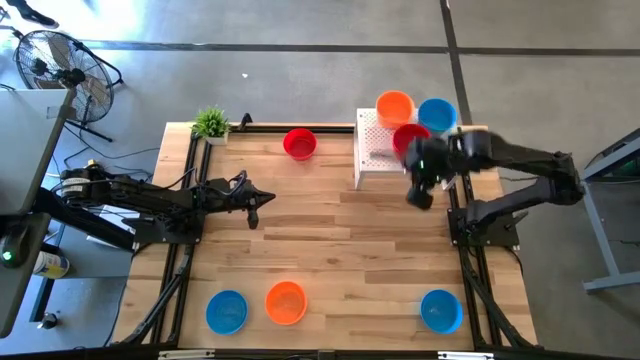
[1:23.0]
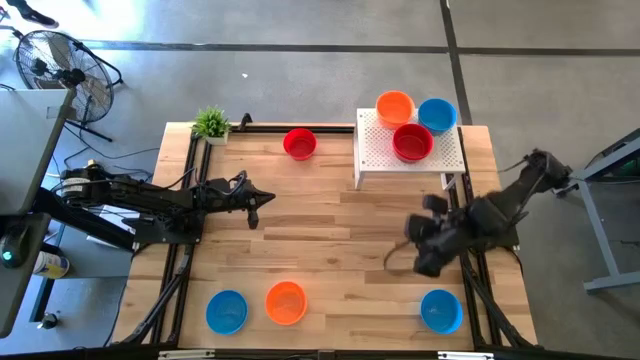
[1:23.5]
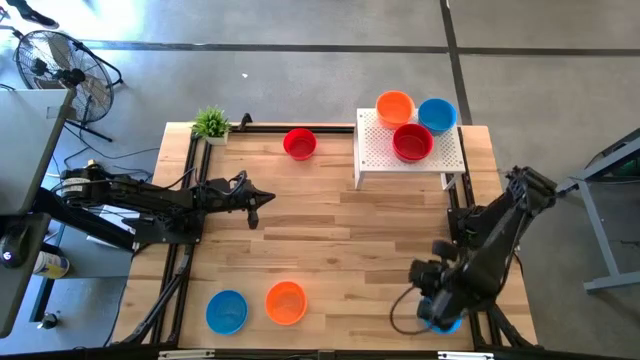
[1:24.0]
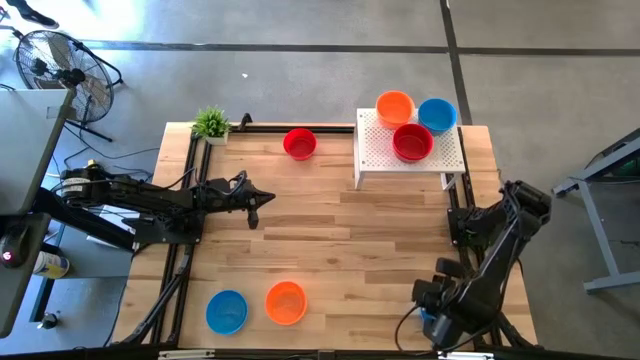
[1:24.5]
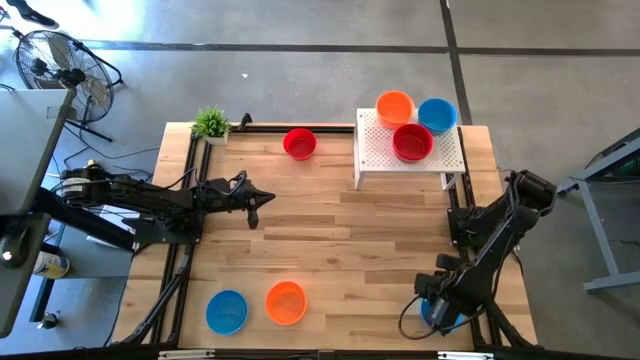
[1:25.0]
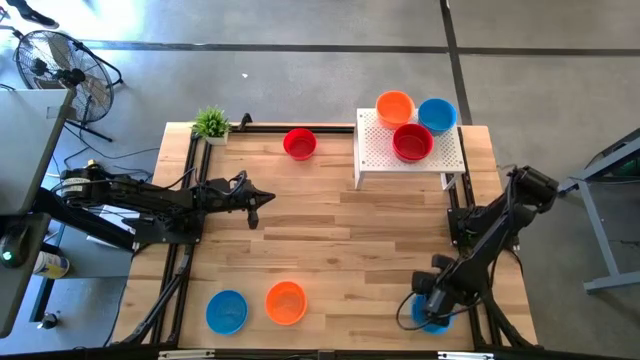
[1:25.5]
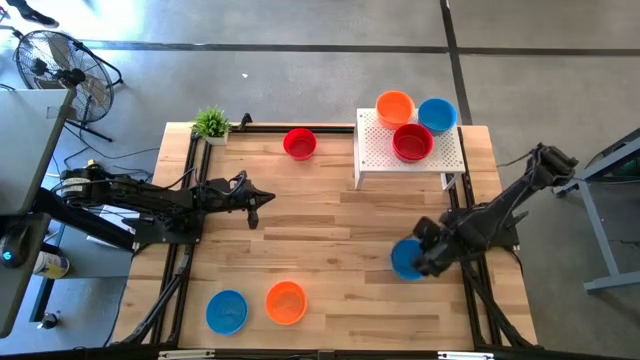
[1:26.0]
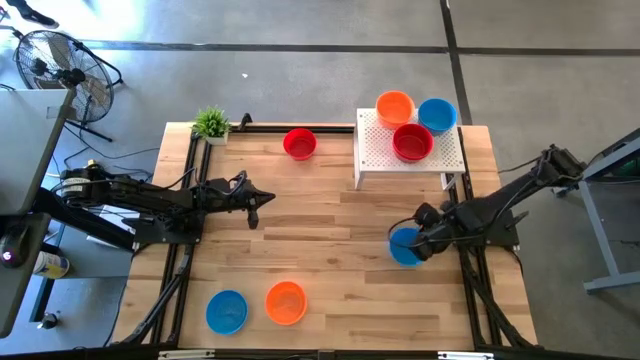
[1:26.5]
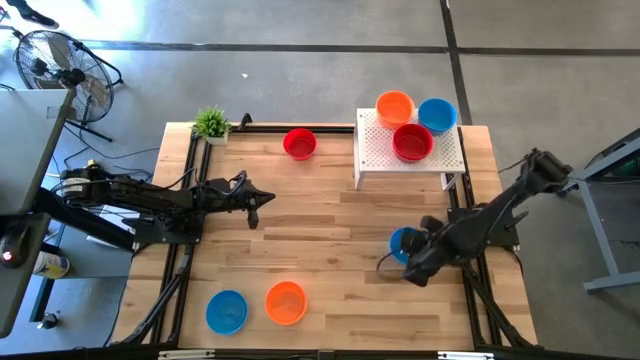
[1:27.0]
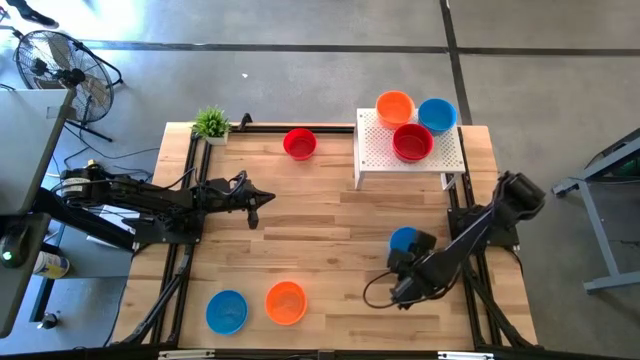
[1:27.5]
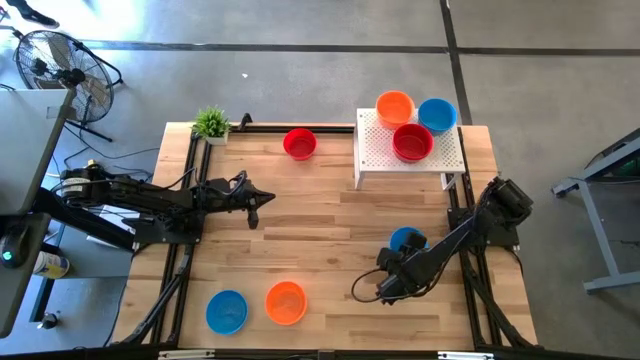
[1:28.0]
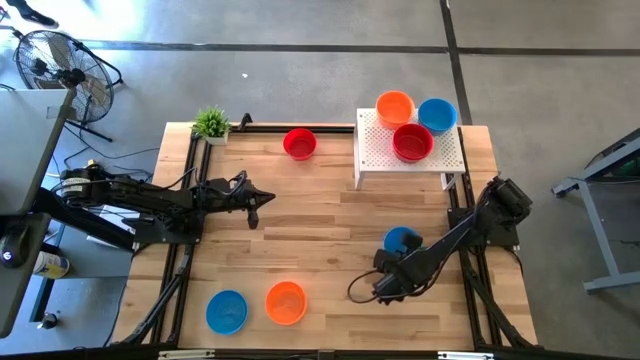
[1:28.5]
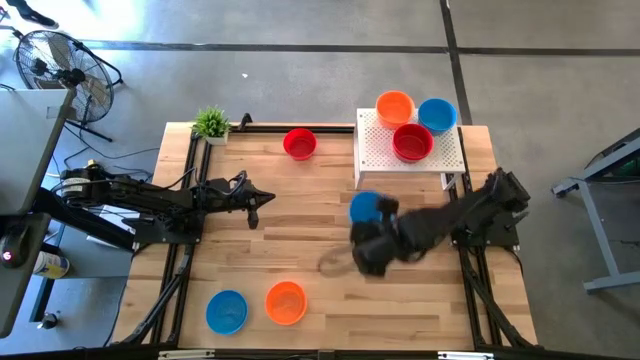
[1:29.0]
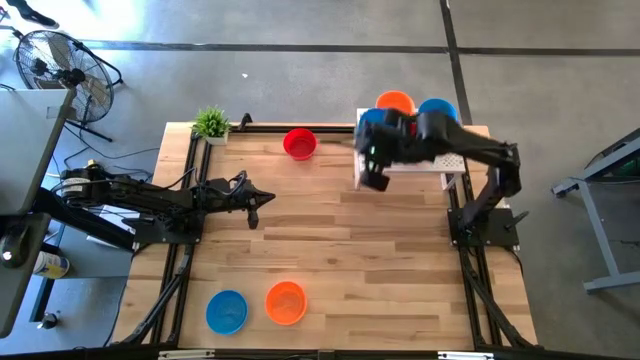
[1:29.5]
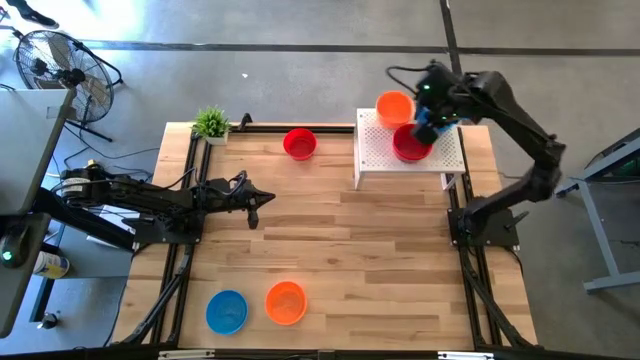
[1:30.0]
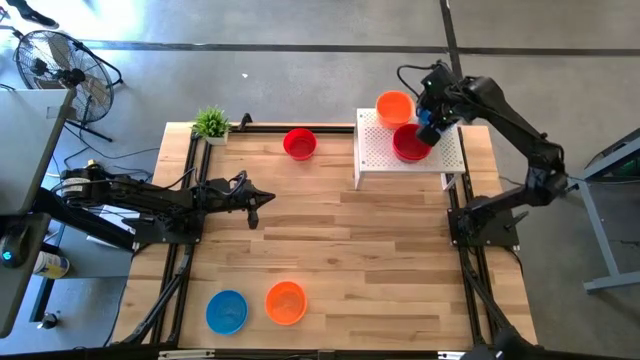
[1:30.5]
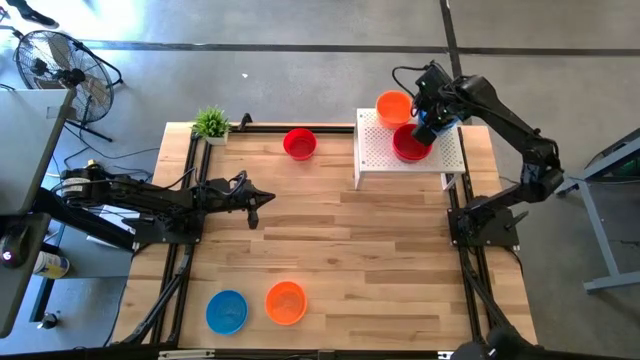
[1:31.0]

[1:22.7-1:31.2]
Task: Pick & Place Mini bowls
Stack the blue bowl on top of the blue bowl on the shelf

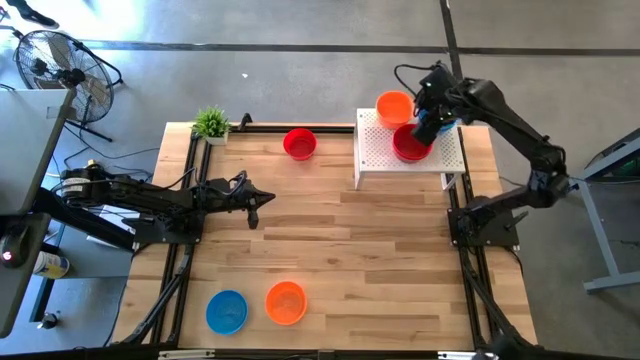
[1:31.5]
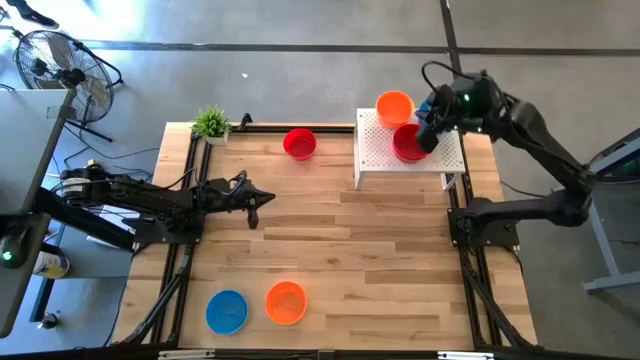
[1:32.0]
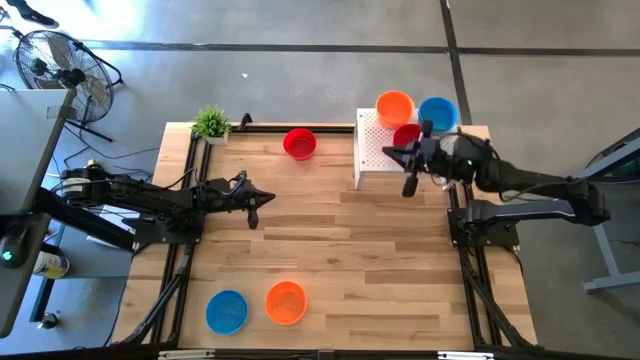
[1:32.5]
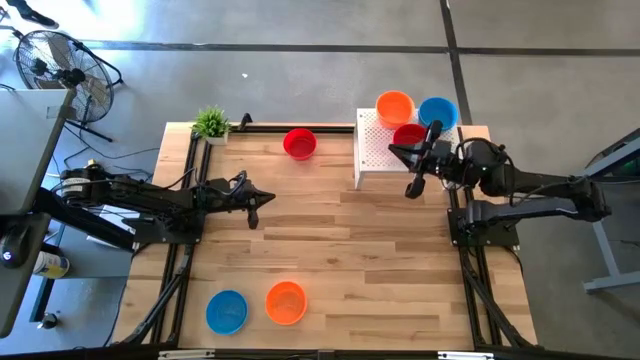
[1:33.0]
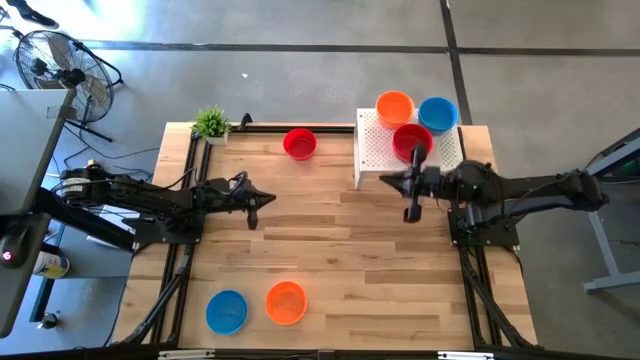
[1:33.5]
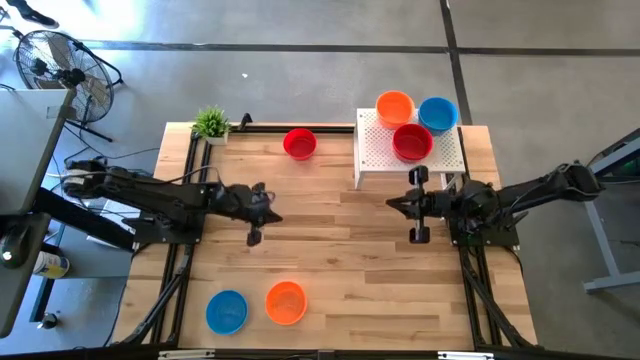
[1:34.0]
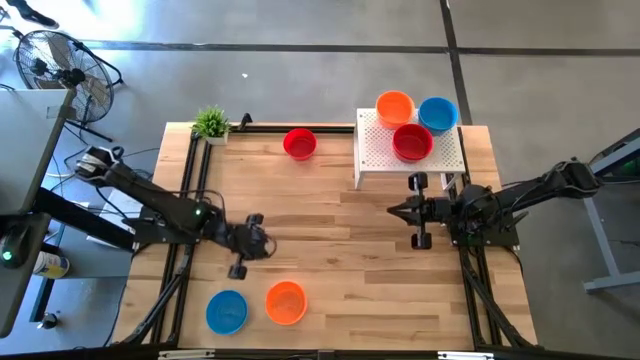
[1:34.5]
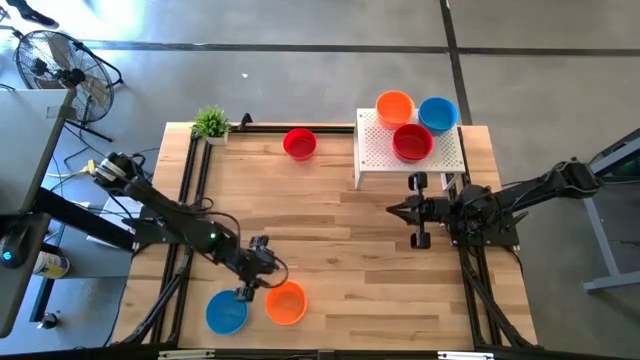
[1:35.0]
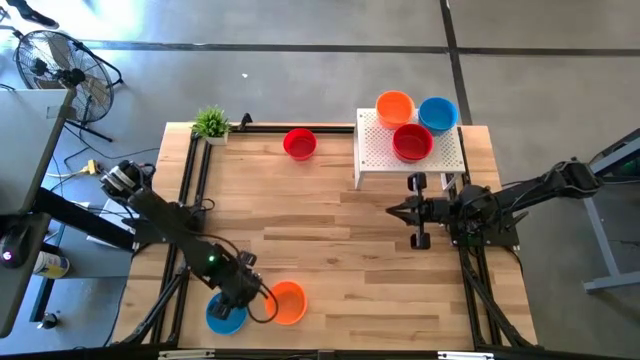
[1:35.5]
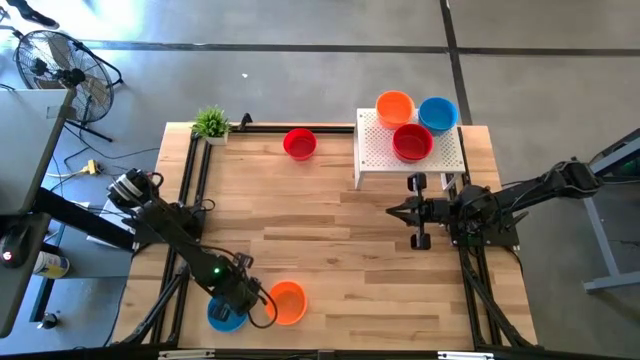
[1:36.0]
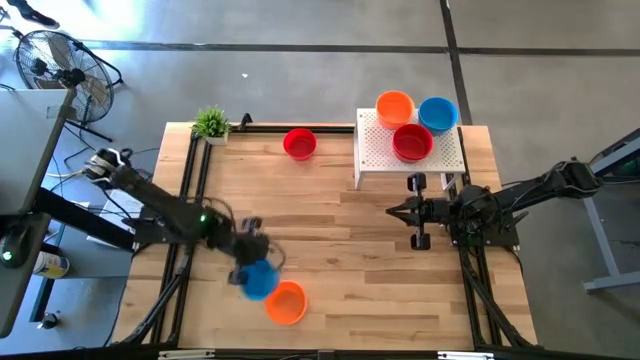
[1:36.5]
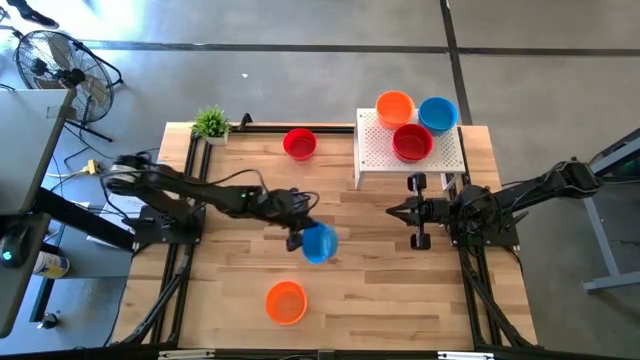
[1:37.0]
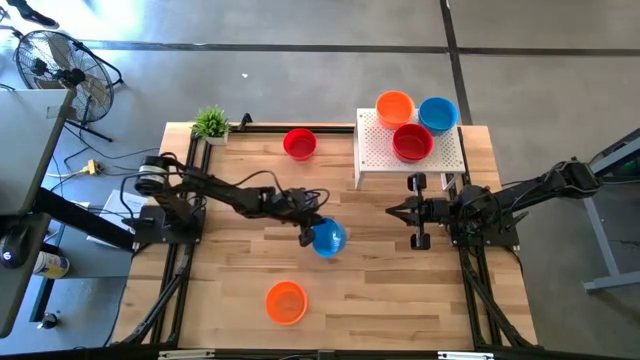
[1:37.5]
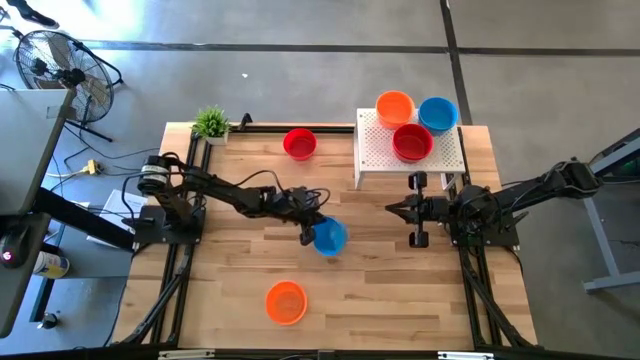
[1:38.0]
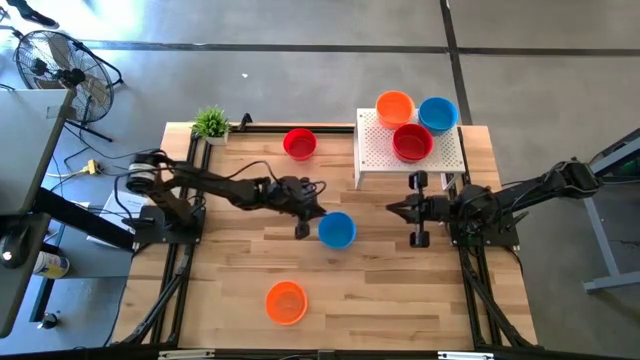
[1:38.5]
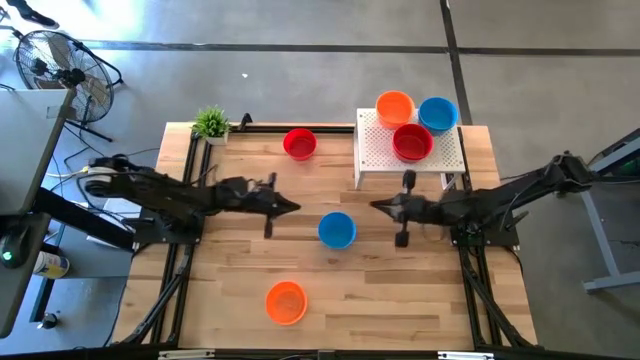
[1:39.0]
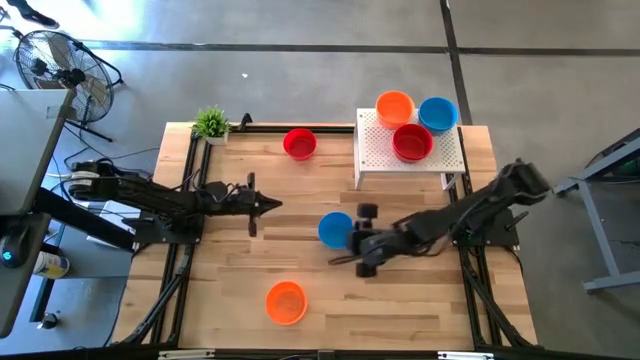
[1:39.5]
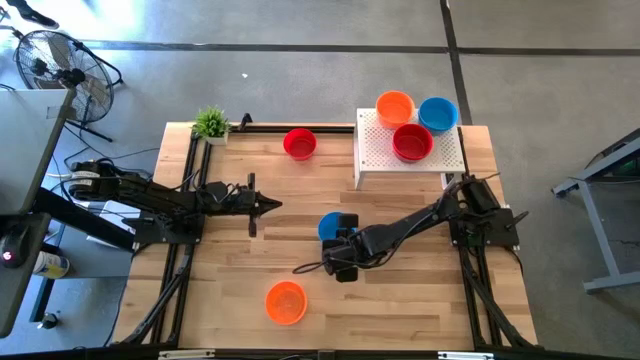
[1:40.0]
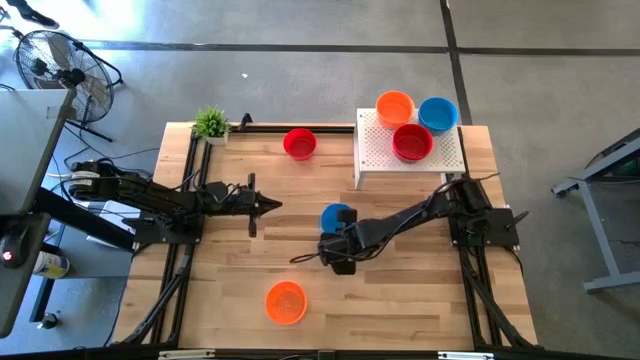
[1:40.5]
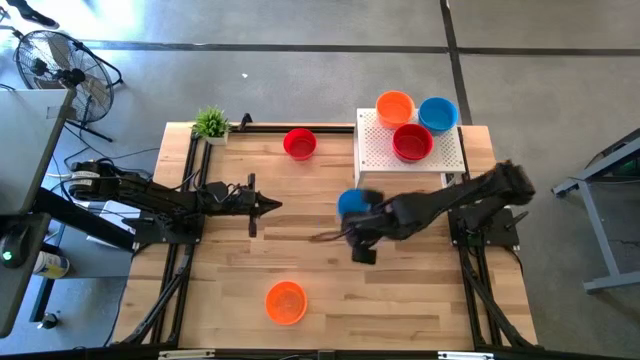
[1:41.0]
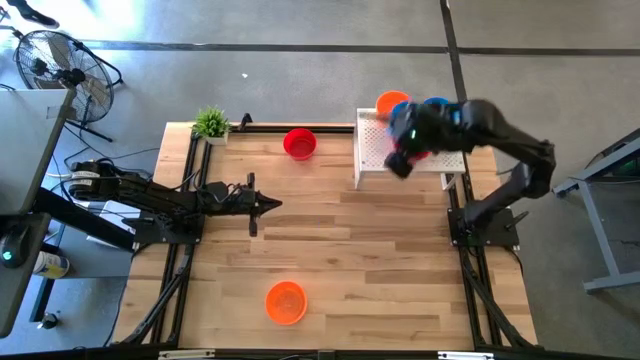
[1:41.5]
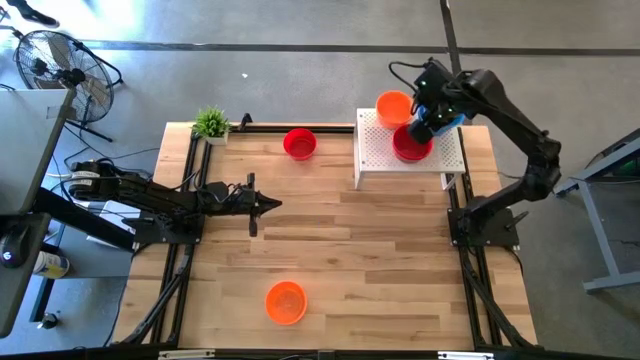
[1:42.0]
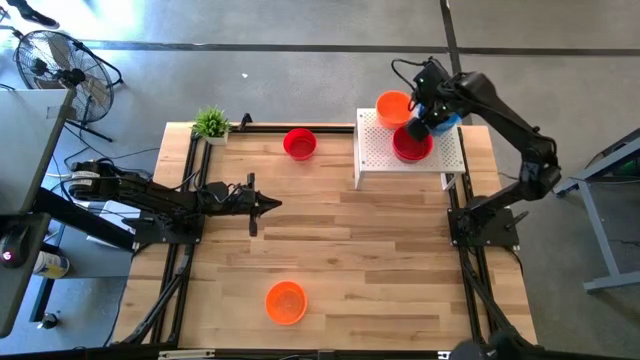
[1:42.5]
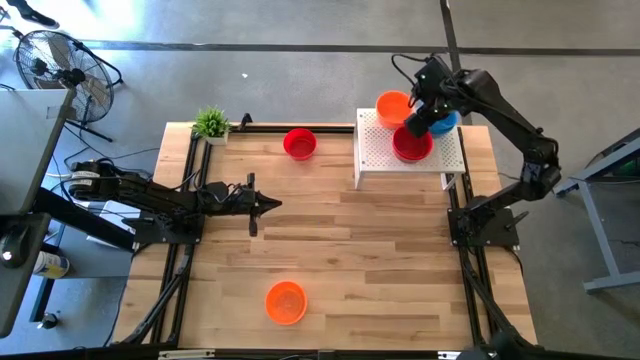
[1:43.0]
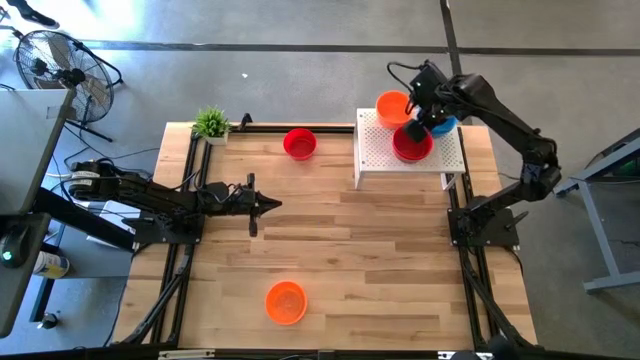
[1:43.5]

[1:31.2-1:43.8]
Stack the blue bowl on top of the blue bowl on the shelf
